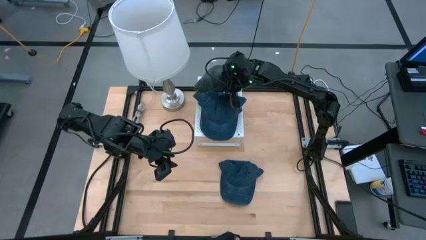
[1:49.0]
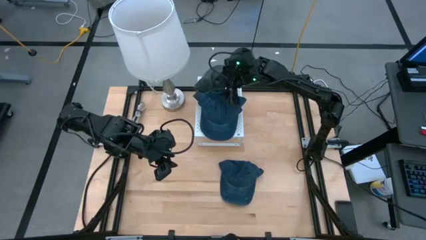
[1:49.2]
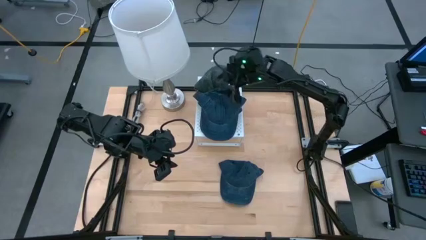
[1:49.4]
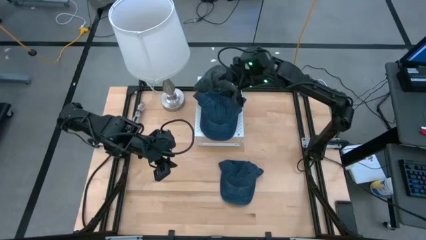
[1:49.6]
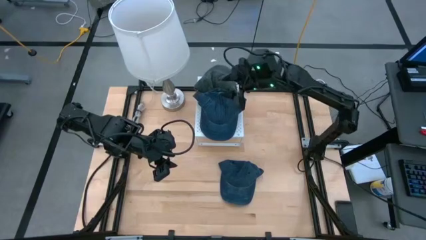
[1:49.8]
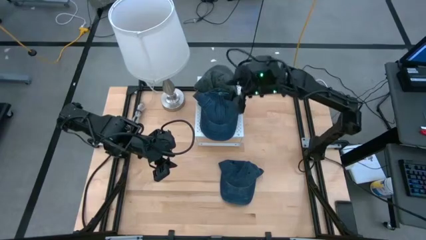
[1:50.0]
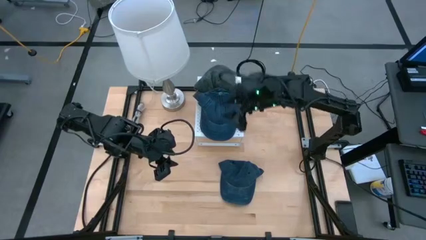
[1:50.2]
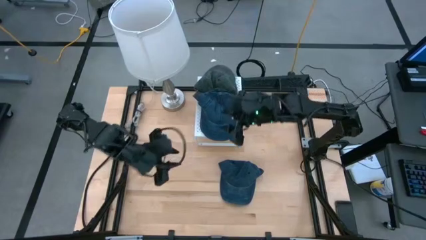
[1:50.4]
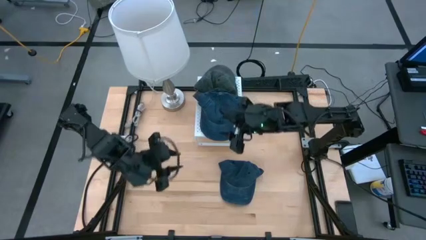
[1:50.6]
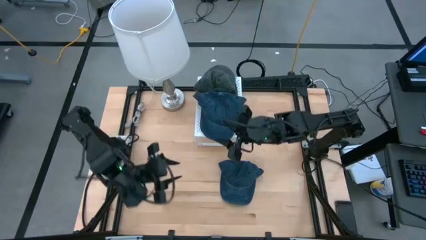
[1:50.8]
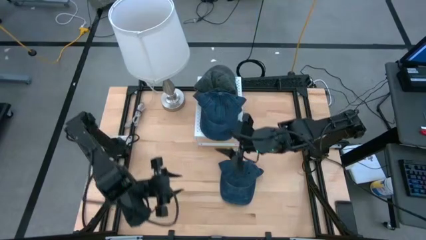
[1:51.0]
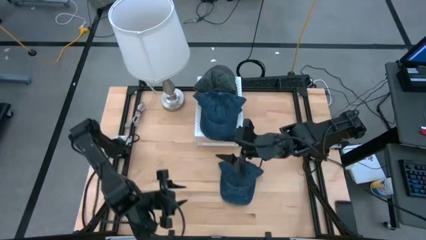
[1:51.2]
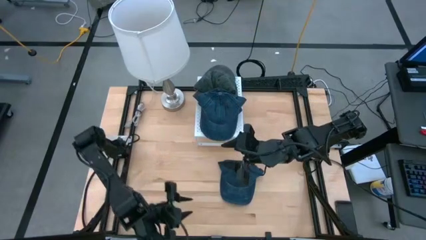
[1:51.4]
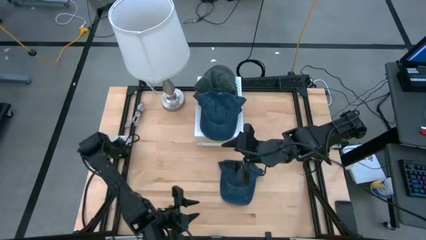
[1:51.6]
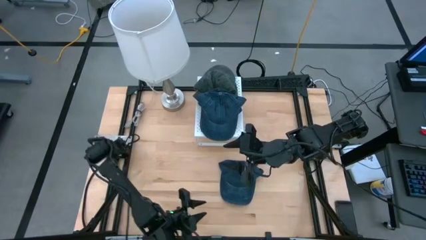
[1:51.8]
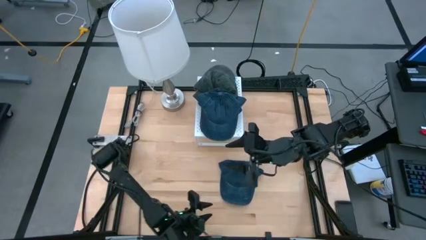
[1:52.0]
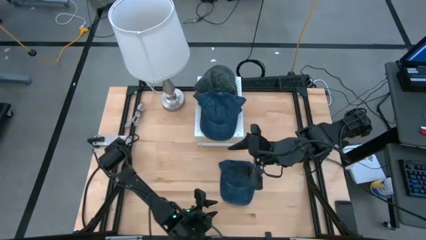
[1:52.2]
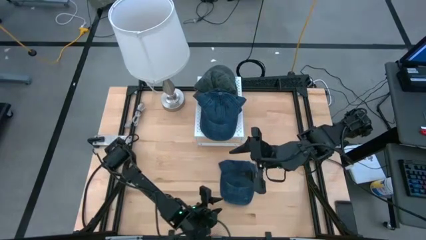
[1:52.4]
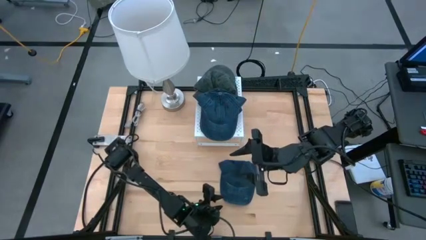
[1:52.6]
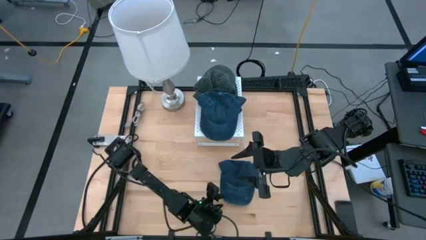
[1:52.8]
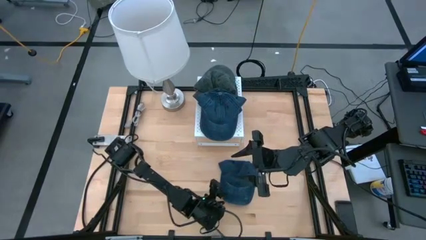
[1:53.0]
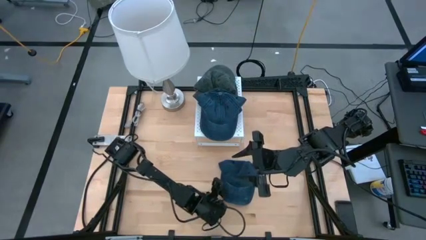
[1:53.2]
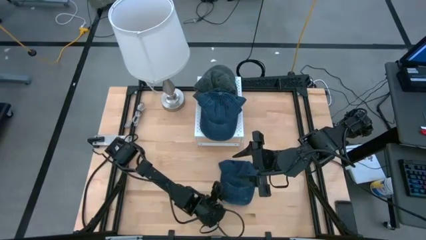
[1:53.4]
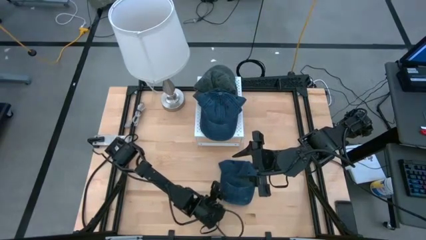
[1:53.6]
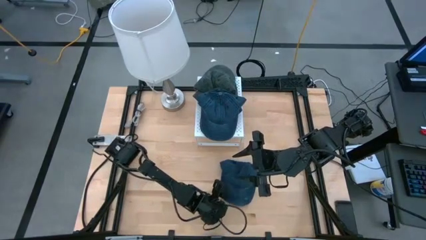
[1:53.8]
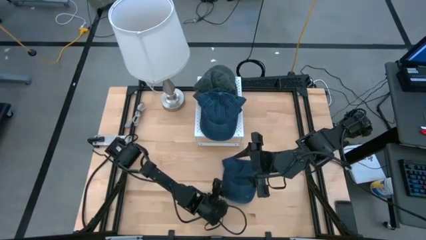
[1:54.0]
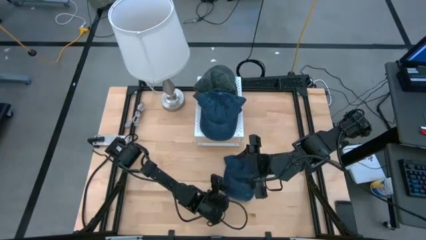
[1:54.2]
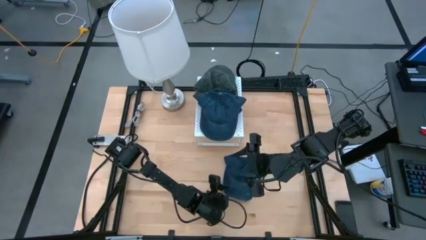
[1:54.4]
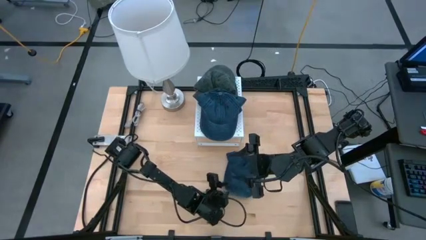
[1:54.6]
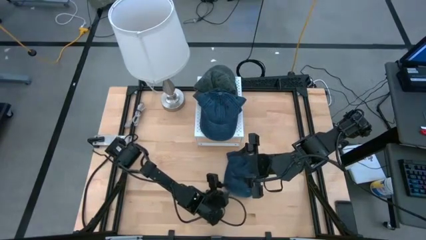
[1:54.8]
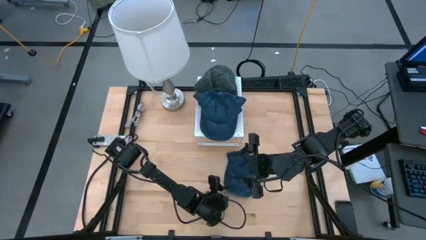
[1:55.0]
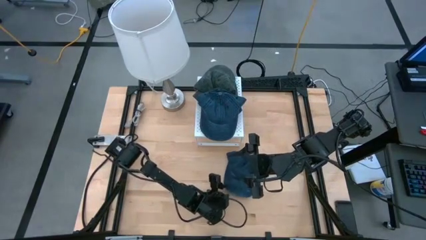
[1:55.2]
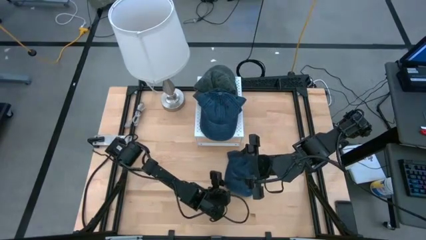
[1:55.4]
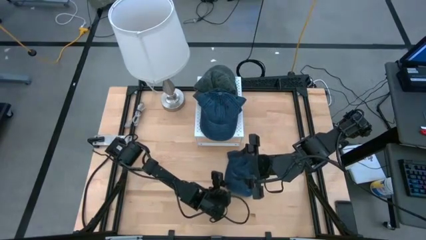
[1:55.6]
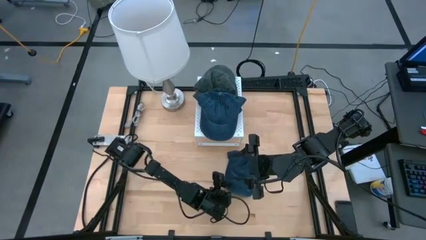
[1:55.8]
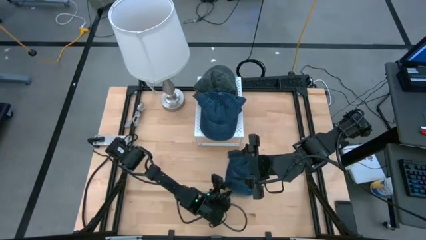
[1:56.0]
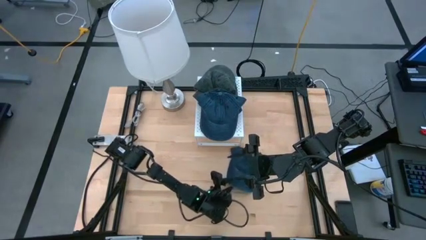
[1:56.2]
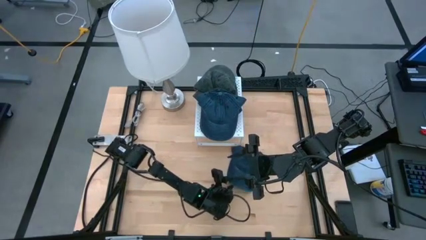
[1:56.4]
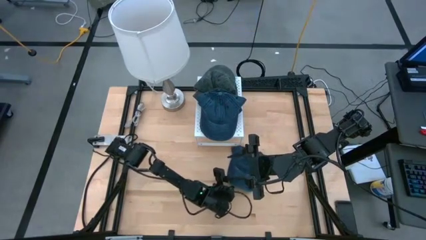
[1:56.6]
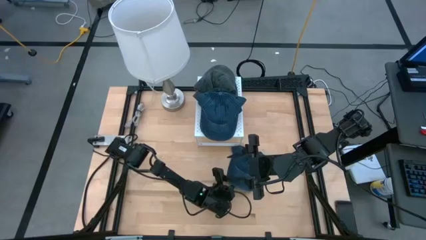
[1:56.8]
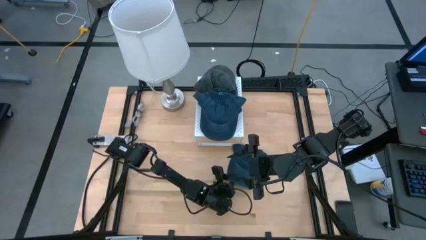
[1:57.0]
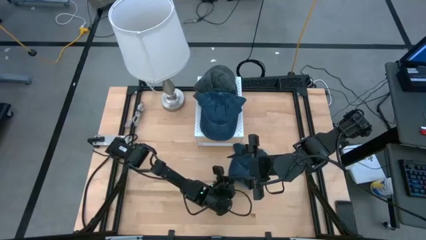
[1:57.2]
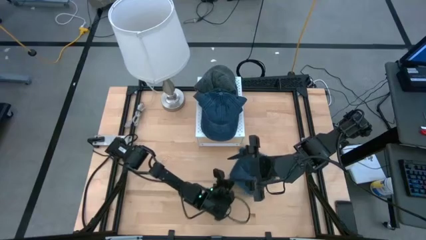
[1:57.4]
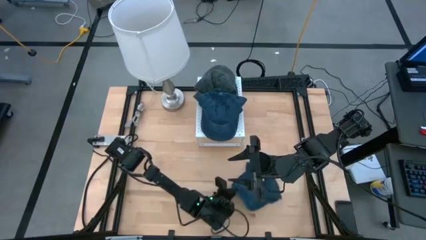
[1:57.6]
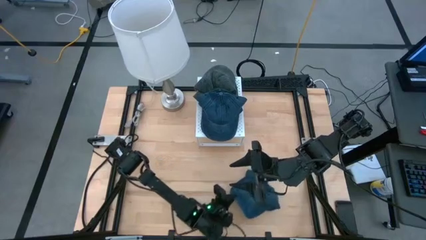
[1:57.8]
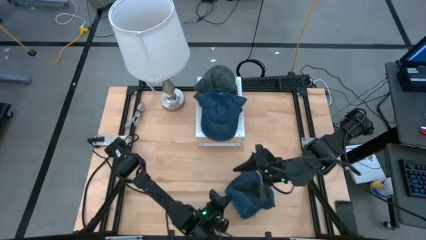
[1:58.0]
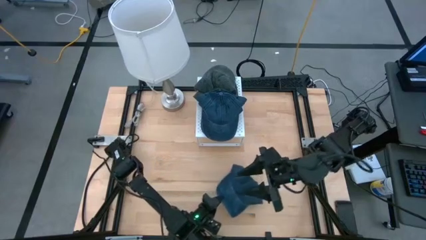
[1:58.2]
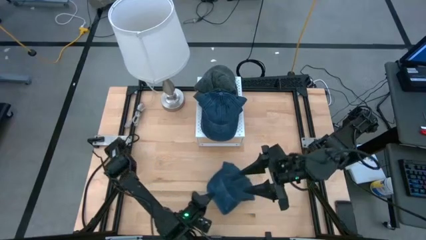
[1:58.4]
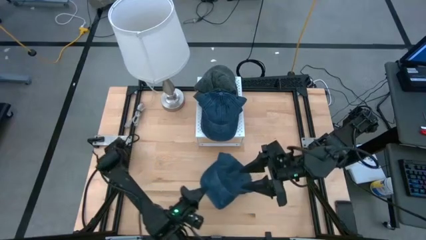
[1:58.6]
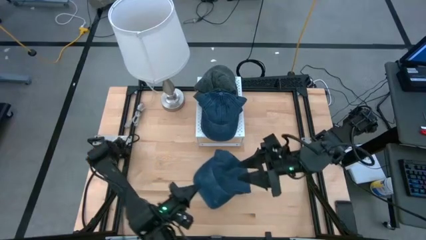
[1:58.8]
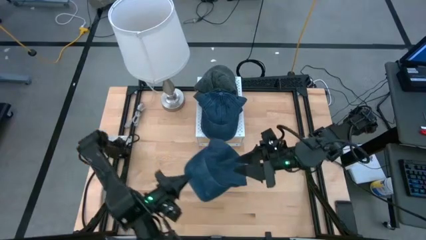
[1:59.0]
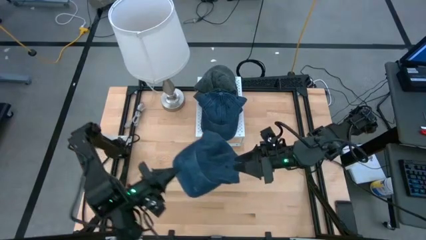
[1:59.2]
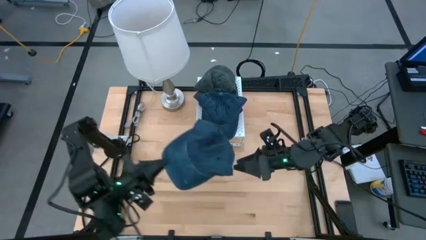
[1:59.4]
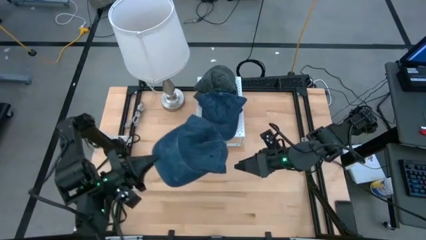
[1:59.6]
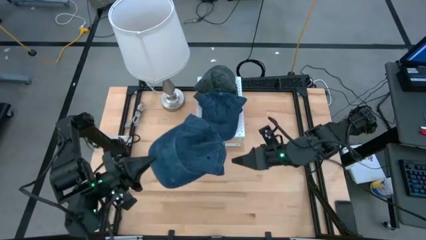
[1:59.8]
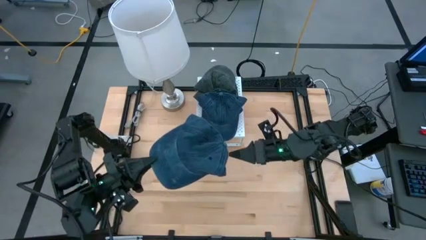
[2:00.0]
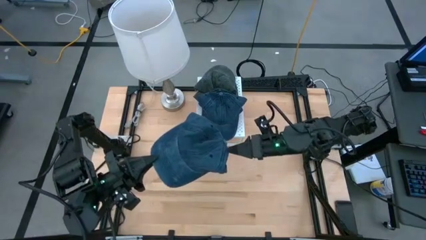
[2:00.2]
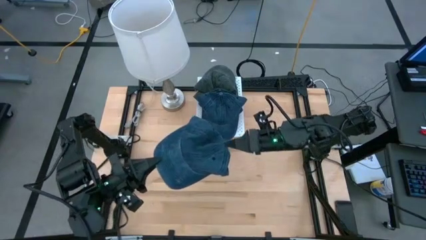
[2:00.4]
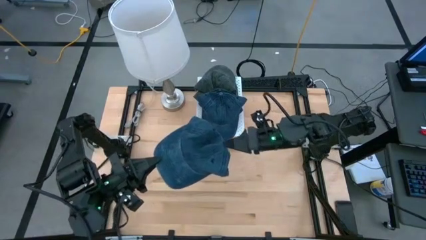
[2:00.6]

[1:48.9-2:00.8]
Task: Pick & Place hat
Stack the blue cap on top of the other blue caps on the shelf

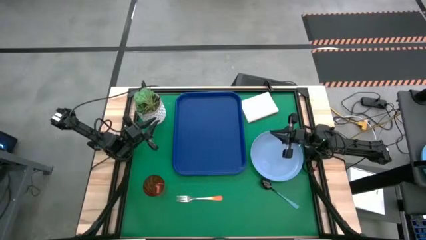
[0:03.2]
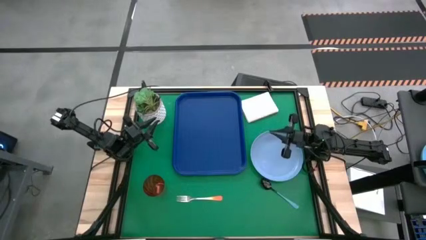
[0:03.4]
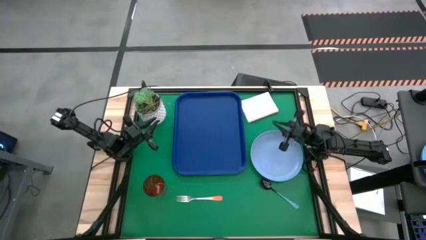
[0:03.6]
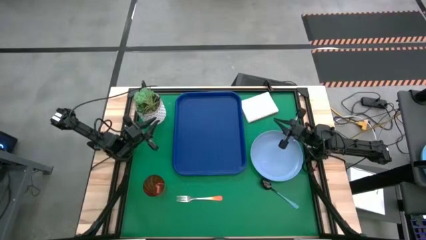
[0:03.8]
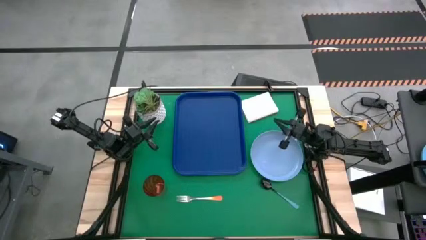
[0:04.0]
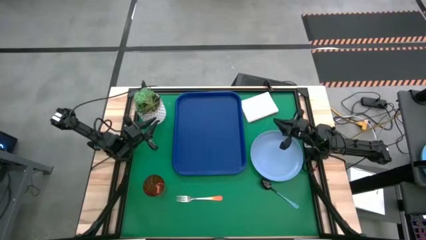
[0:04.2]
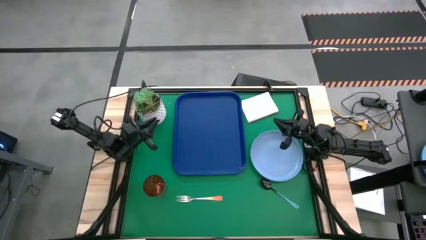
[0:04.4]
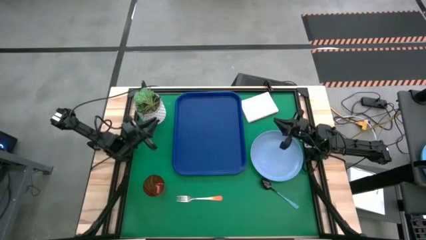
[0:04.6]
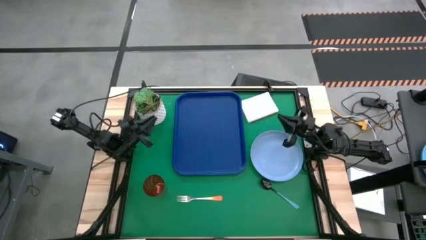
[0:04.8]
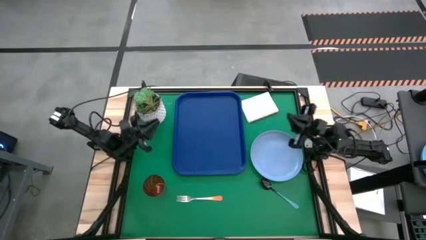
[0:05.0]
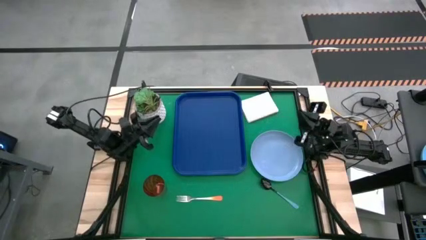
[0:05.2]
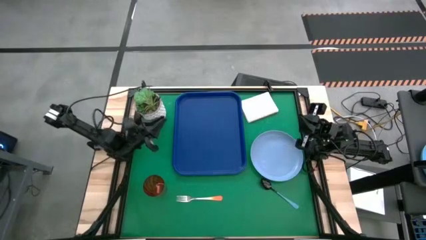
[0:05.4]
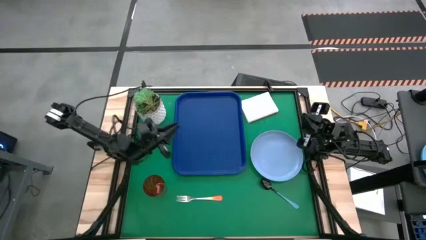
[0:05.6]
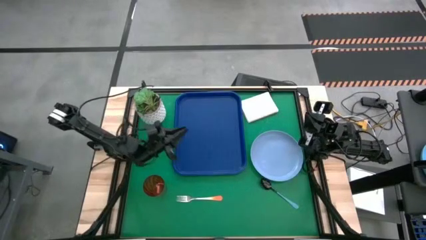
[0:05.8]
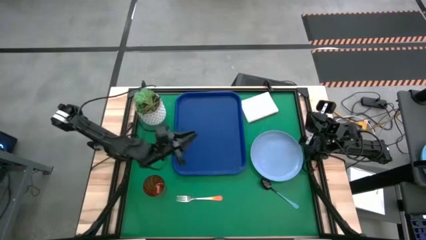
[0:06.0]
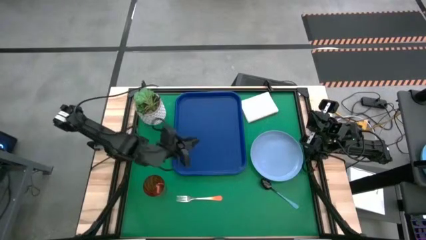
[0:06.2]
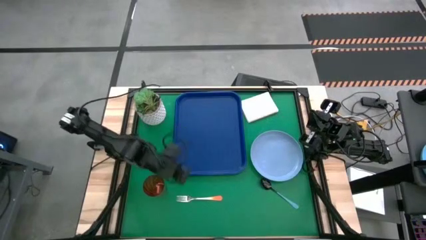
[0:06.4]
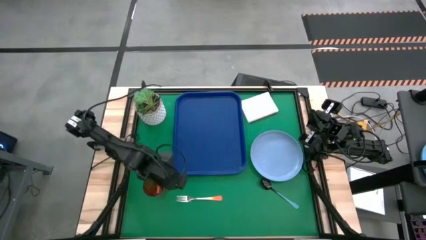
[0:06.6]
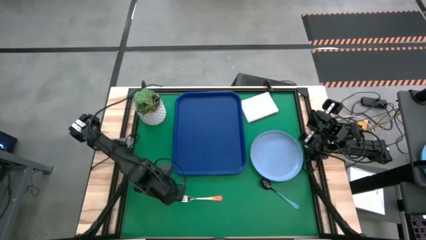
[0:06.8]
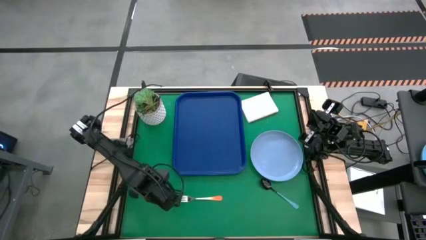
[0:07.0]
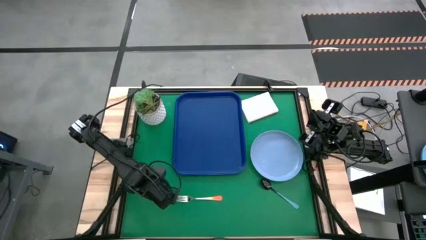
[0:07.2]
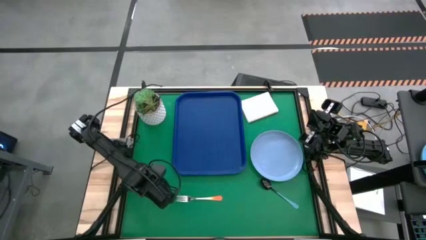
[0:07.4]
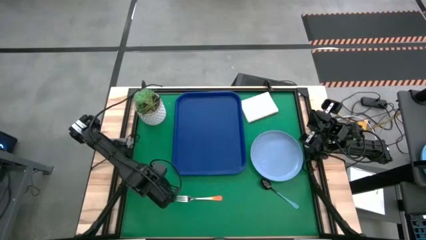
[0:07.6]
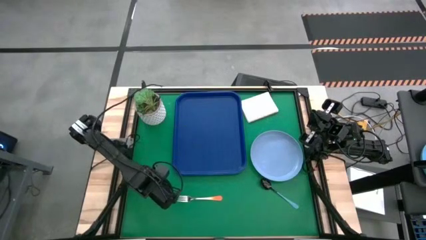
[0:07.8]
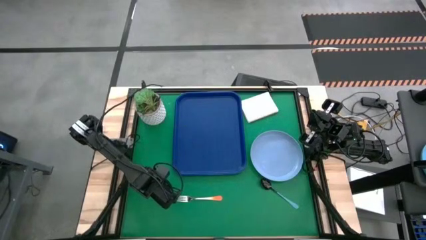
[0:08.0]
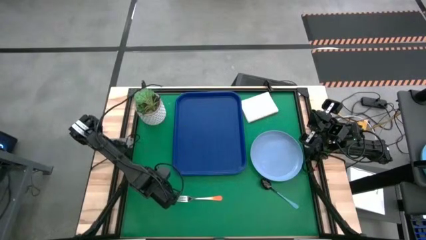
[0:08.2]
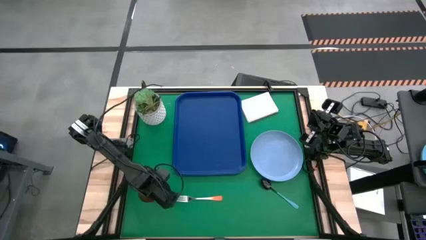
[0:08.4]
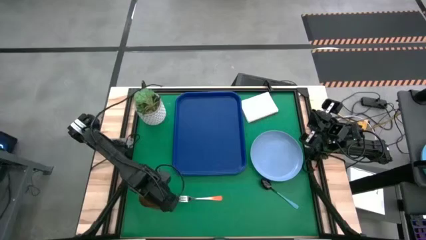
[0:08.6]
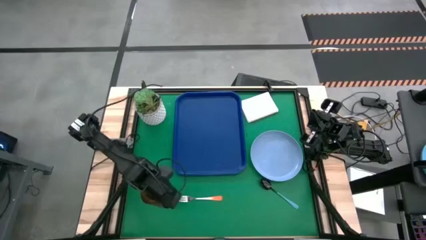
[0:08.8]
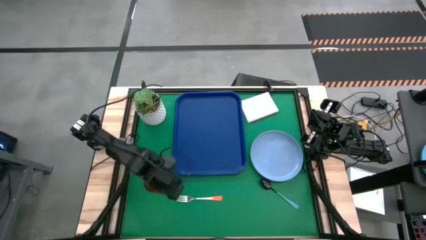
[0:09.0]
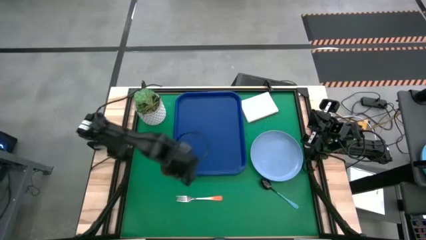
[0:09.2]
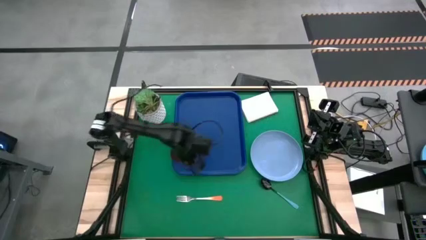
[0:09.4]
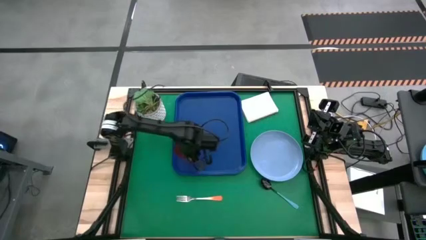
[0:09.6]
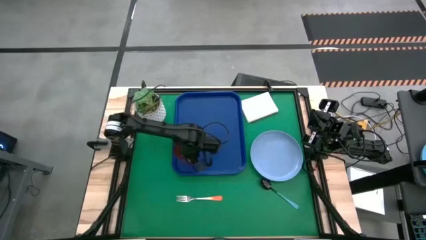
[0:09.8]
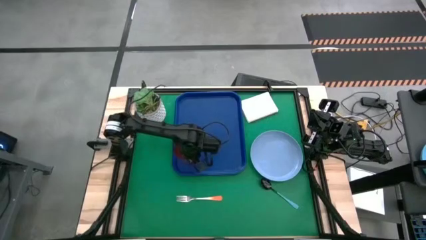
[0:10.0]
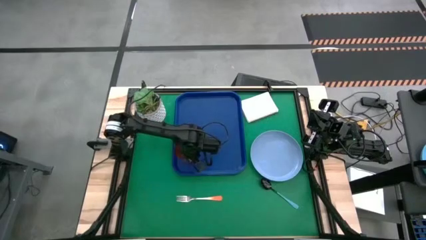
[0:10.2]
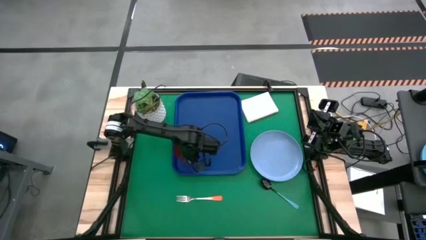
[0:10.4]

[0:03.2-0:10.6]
Task: Pick and place plate/cup/fork/spoon on tray
Put the brown glass on the blue tray
